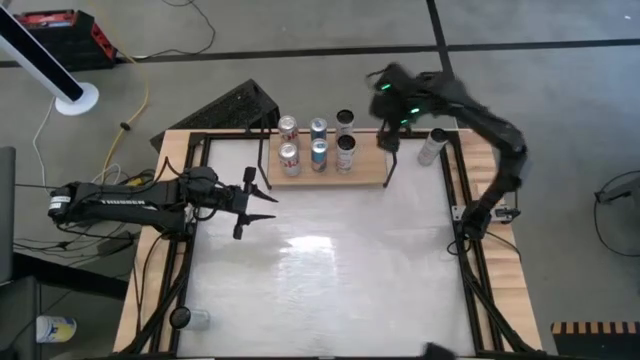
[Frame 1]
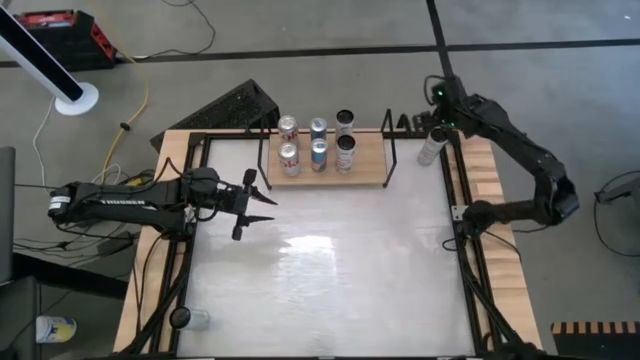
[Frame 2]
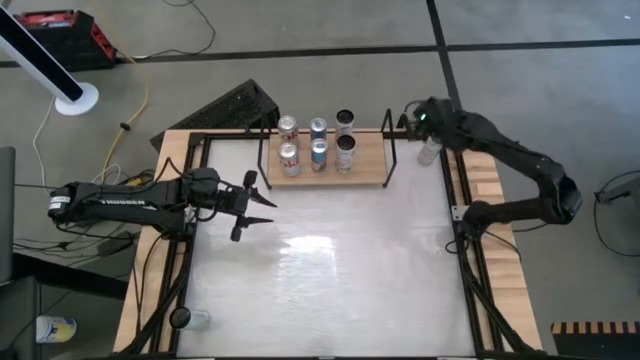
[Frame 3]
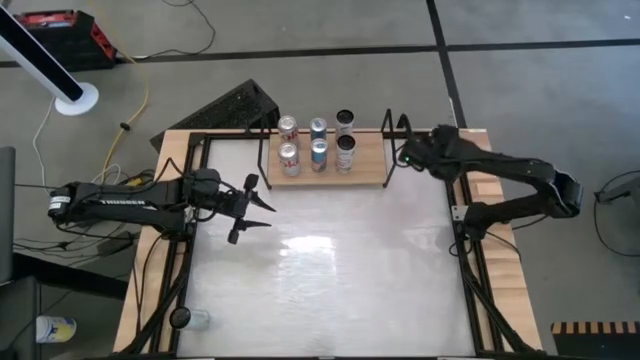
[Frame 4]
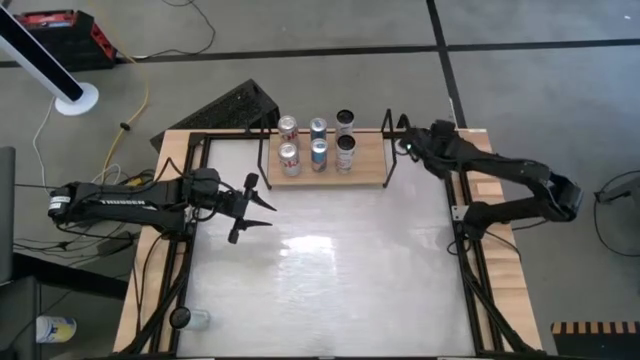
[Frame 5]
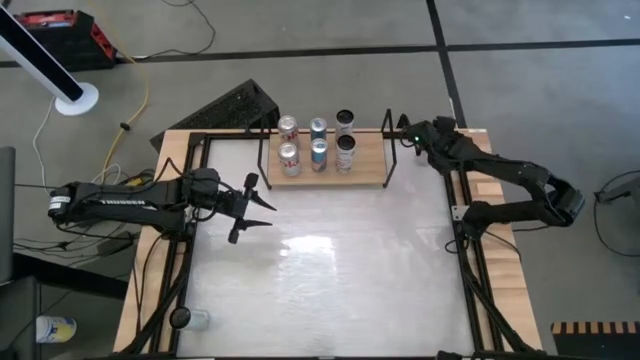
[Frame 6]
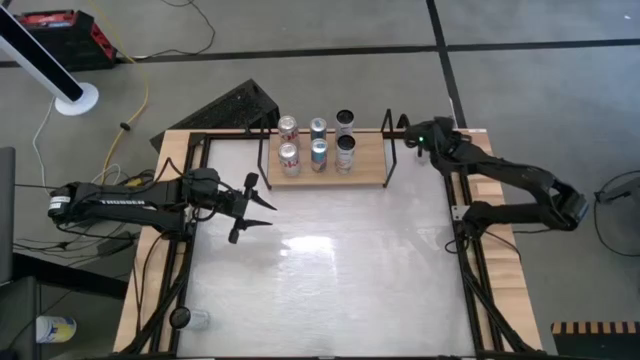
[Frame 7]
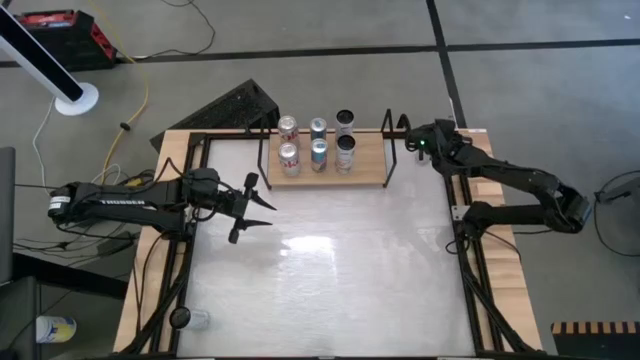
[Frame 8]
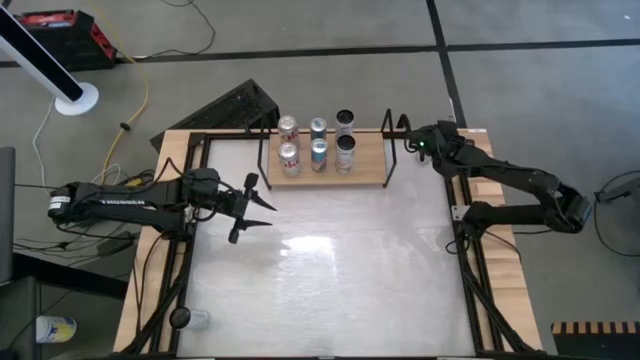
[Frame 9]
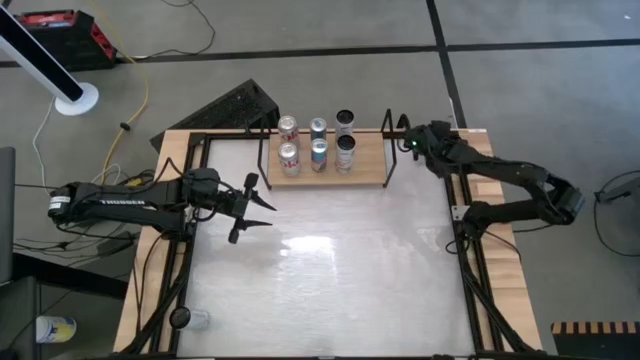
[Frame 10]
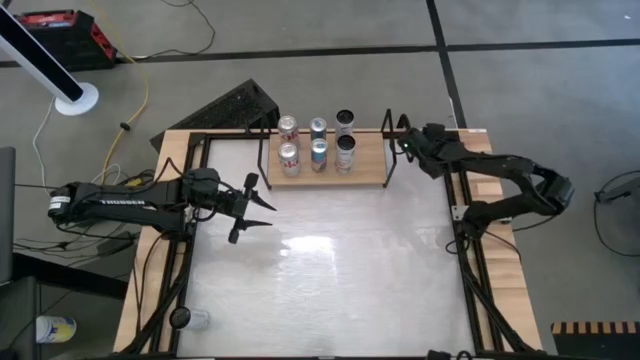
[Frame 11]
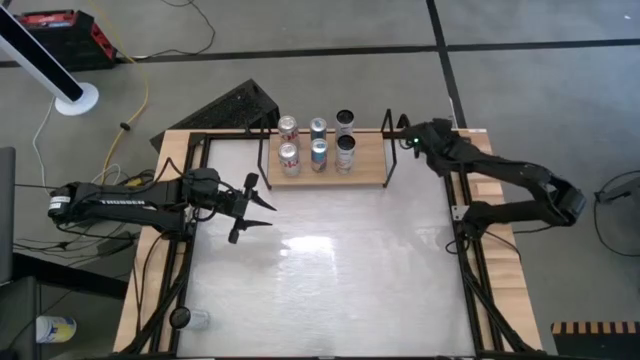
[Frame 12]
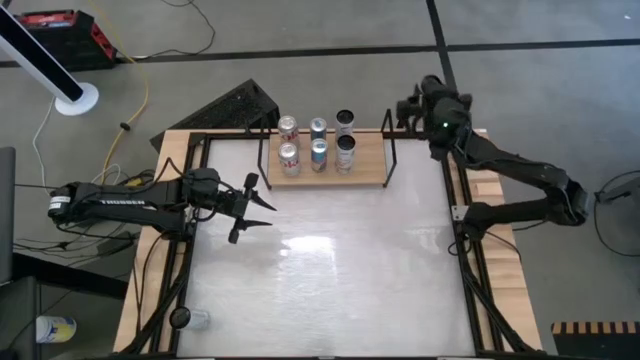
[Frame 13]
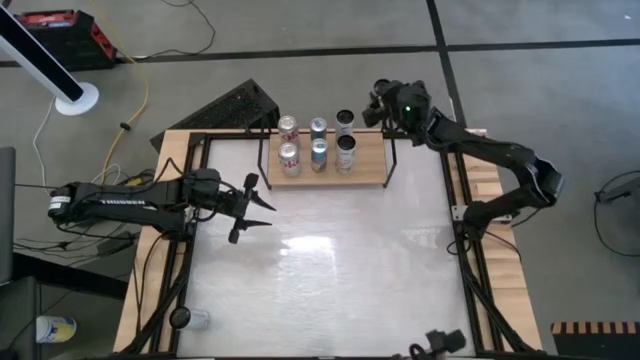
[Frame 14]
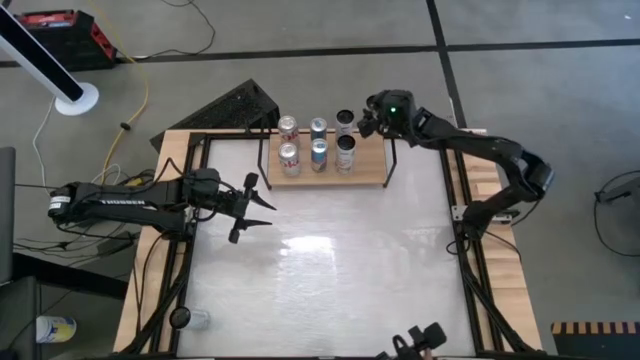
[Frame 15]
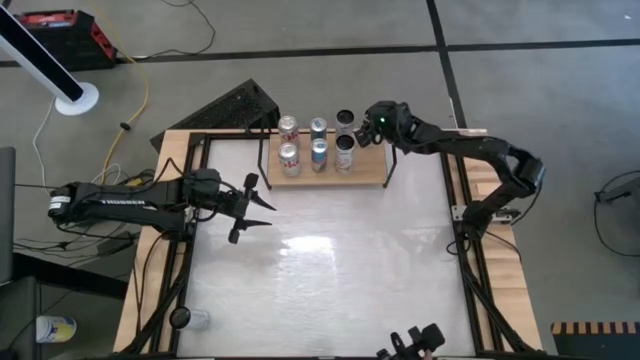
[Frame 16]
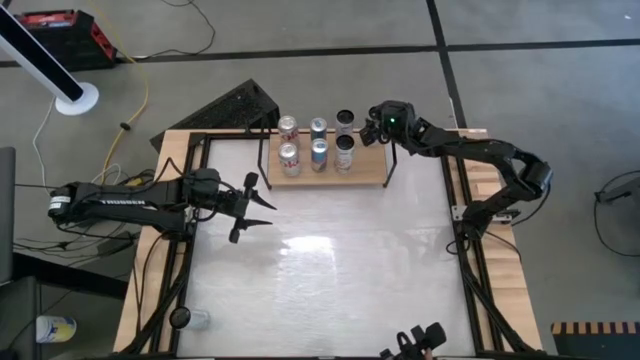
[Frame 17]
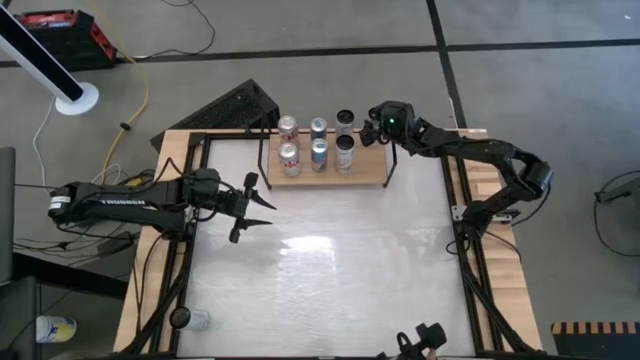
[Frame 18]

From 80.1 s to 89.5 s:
Task: Place canned beverage on shelf
Put the top white yellow soda can on the shelf

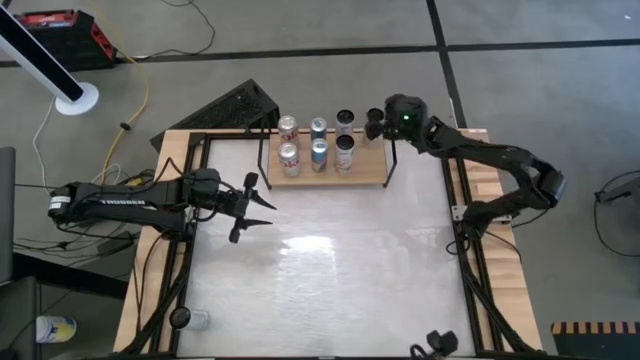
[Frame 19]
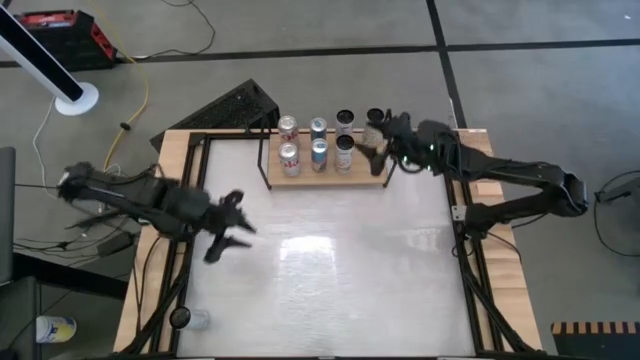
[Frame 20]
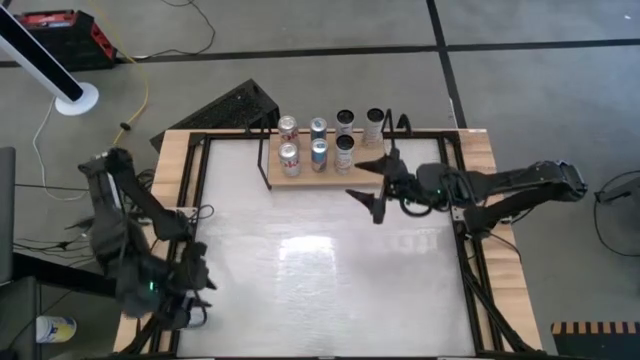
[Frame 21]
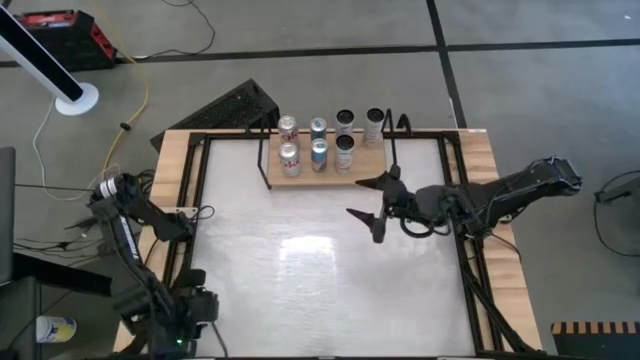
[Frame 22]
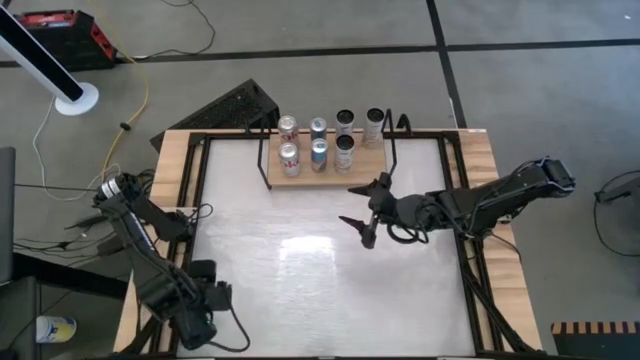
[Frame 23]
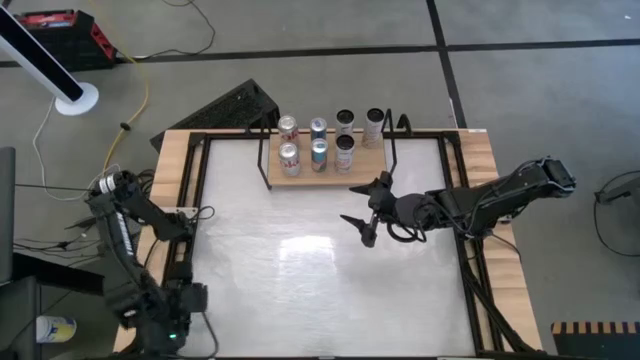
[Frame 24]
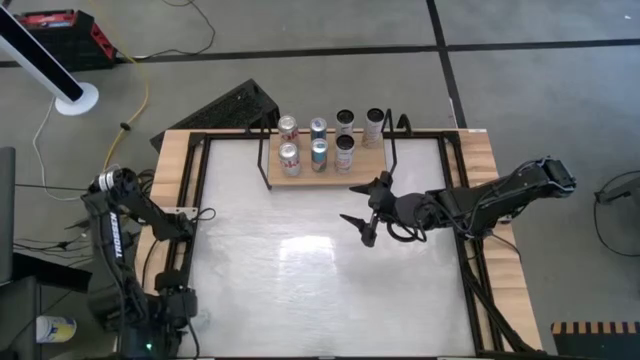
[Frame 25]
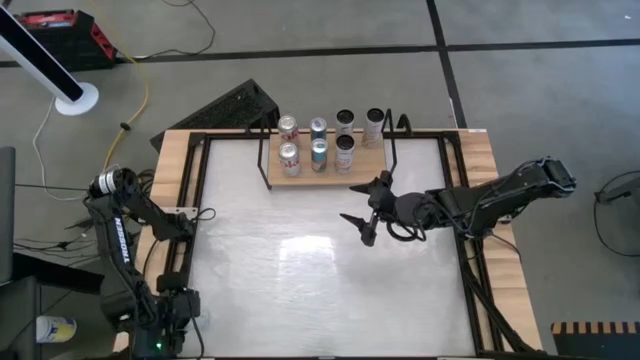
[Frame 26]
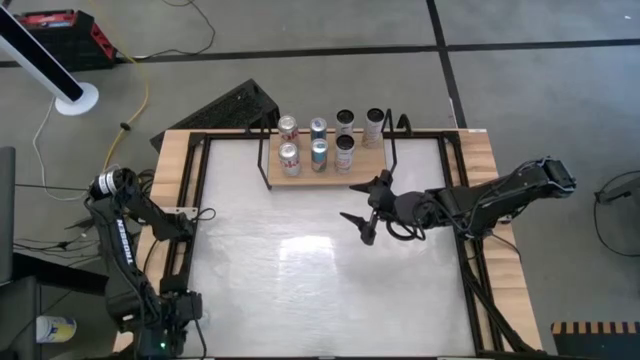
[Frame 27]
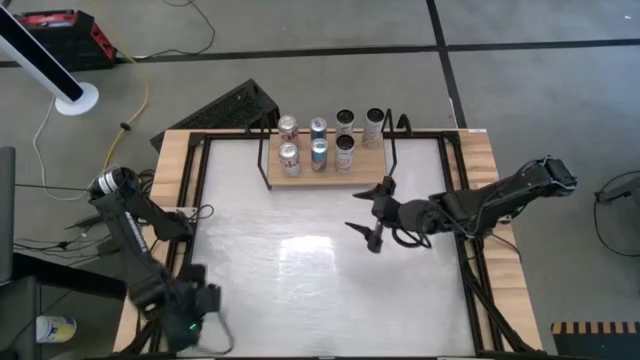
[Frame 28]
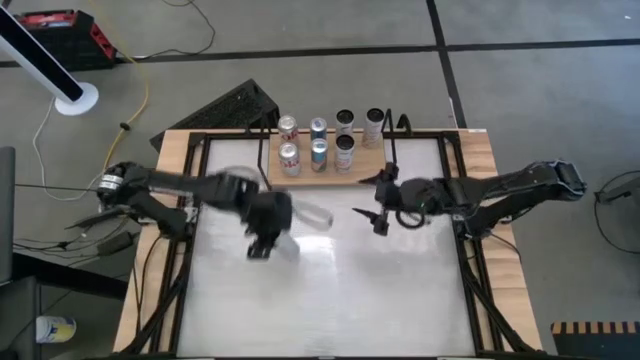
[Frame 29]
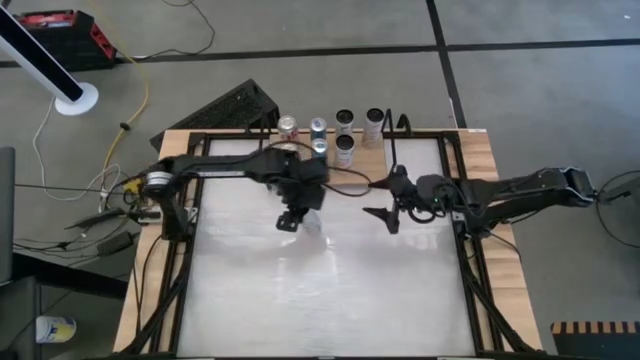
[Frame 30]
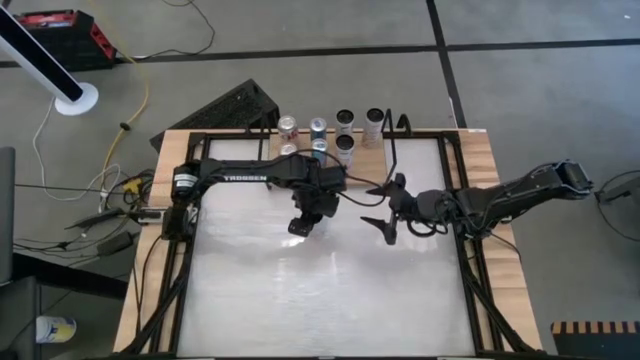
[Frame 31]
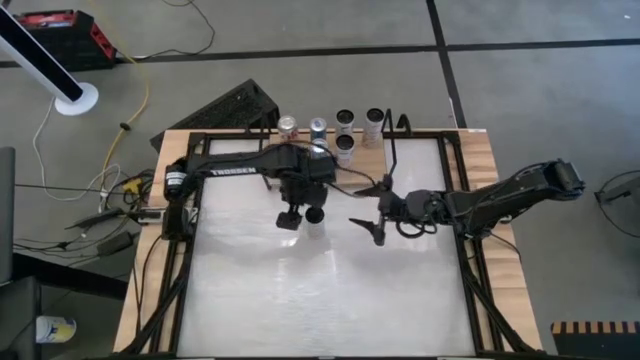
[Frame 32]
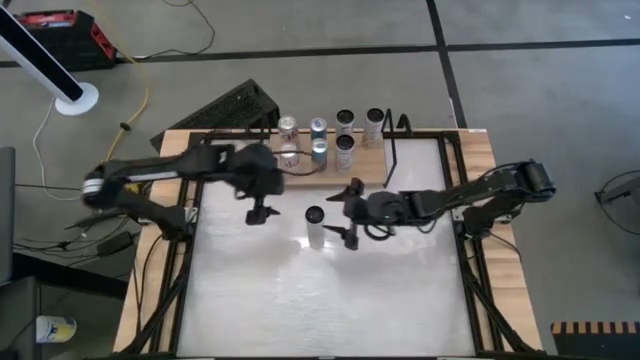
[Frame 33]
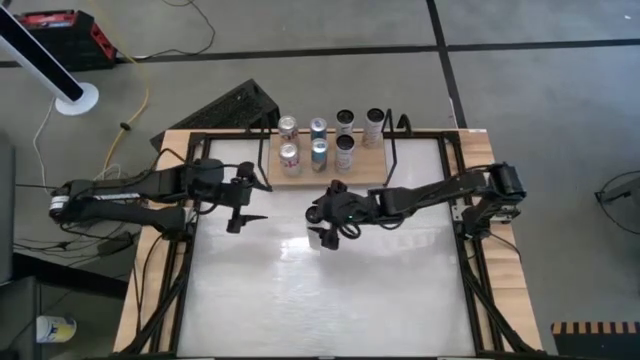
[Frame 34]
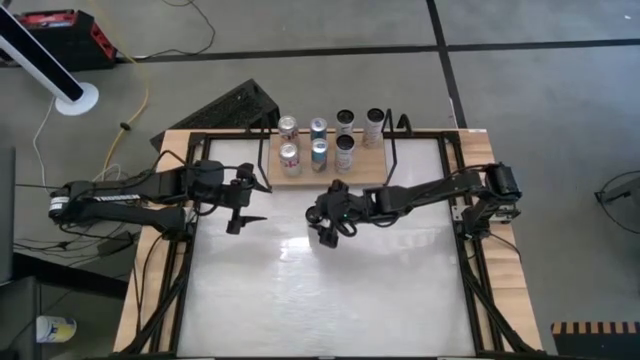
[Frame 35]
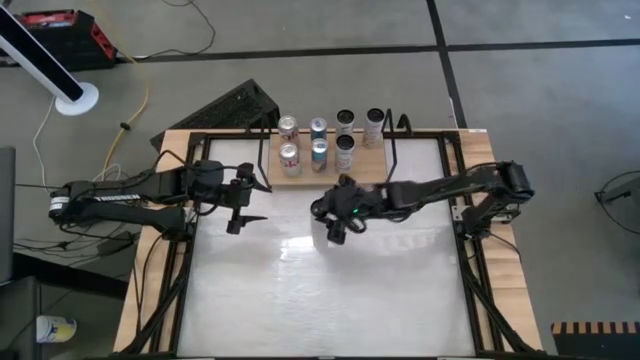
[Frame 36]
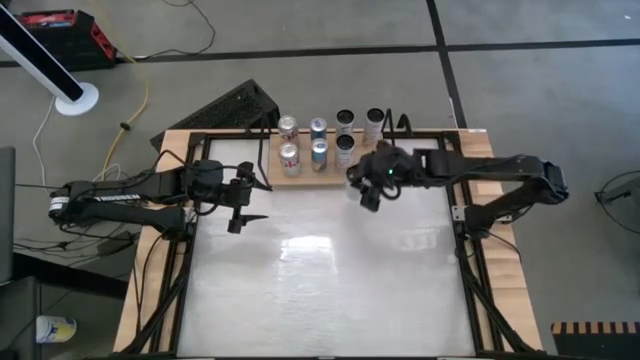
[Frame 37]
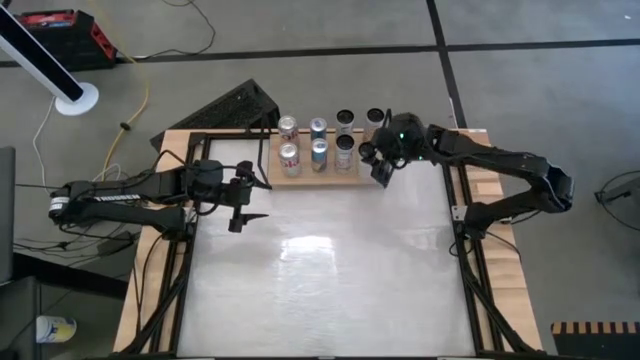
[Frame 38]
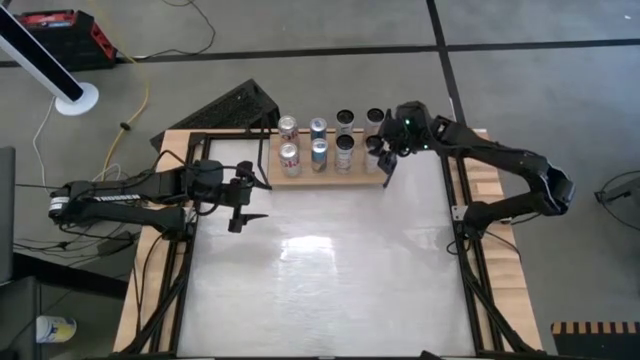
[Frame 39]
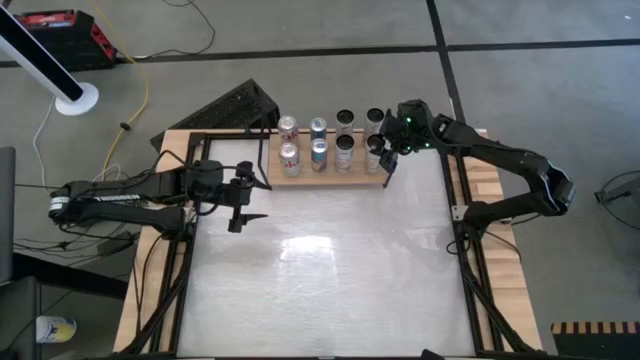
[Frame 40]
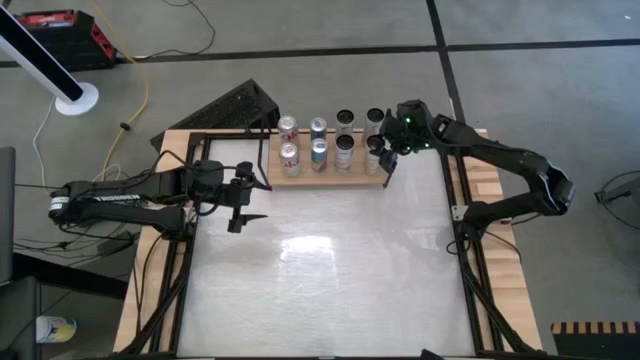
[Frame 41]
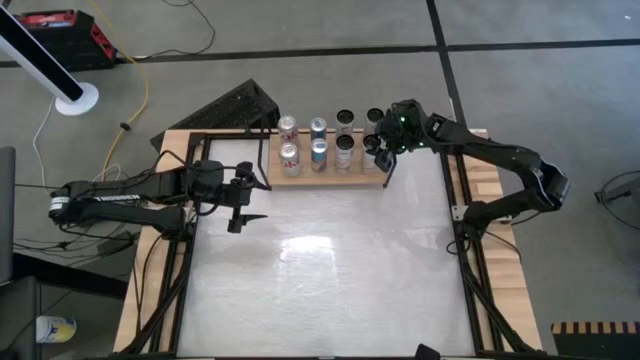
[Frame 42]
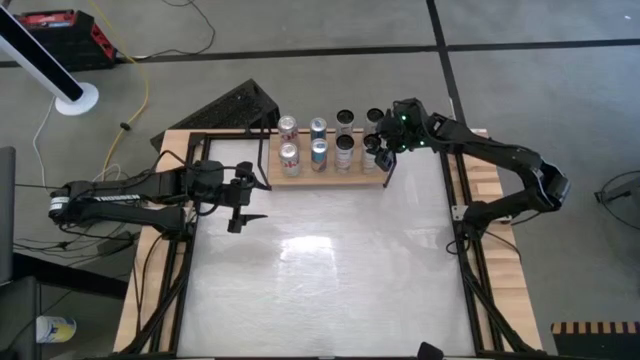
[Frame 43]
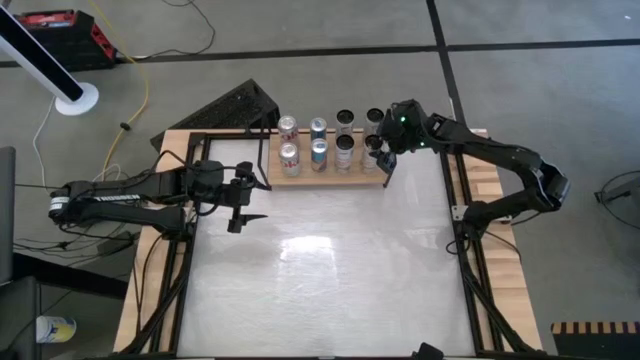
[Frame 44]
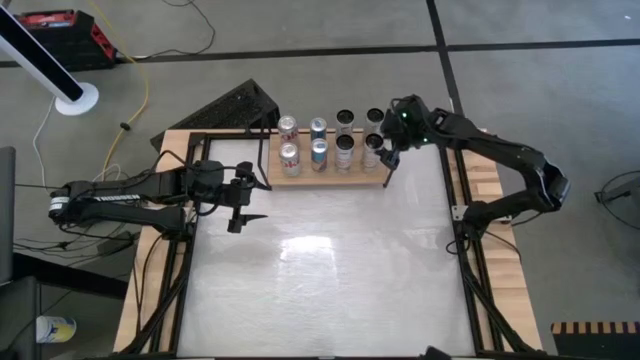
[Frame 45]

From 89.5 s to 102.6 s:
Put the white yellow soda can on the shelf aligned with the other white yellow soda can
